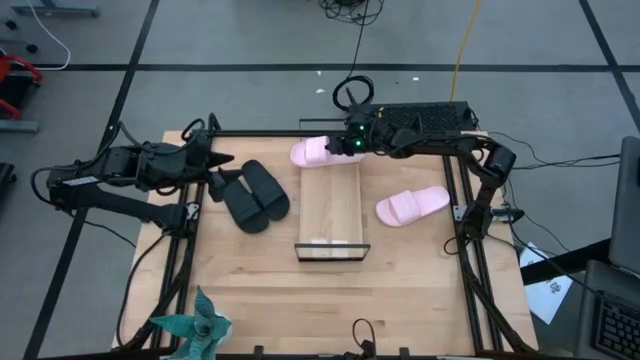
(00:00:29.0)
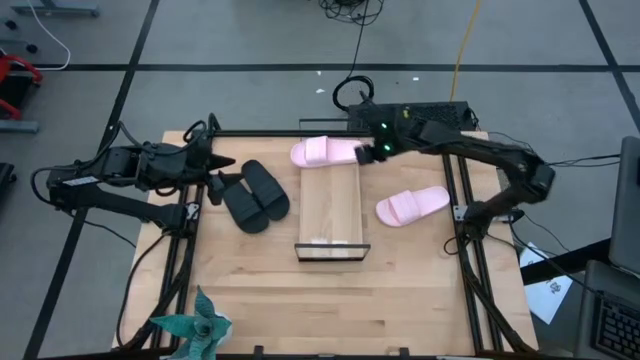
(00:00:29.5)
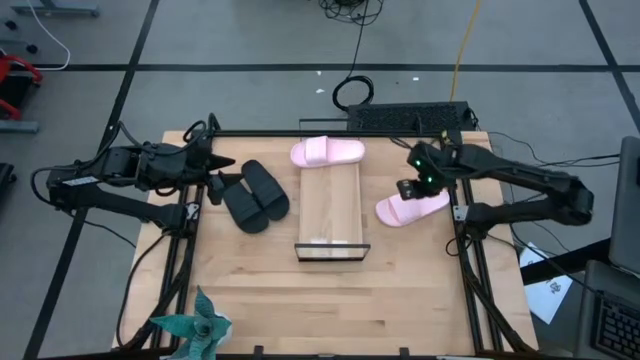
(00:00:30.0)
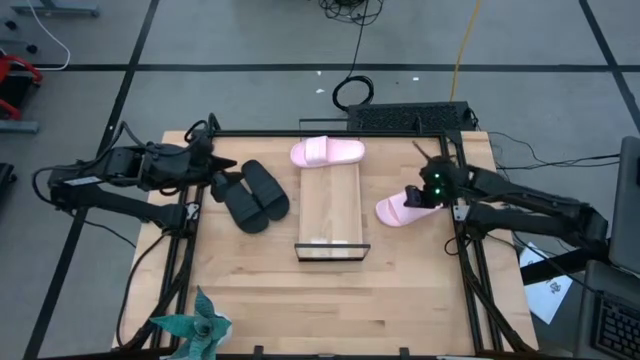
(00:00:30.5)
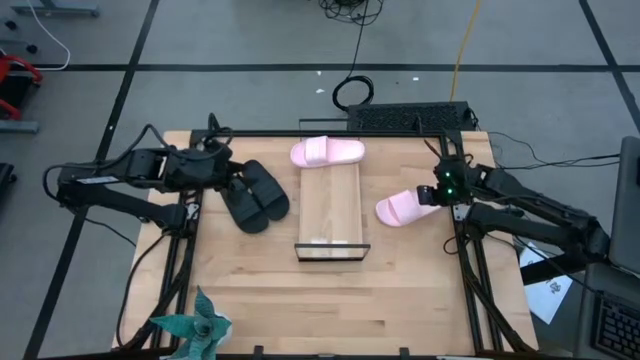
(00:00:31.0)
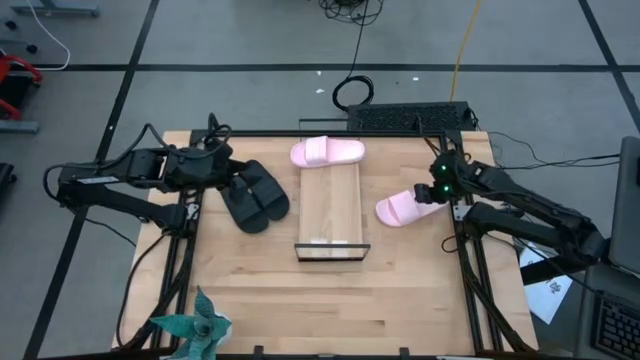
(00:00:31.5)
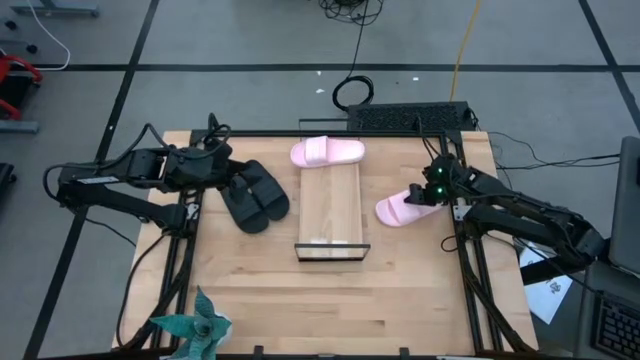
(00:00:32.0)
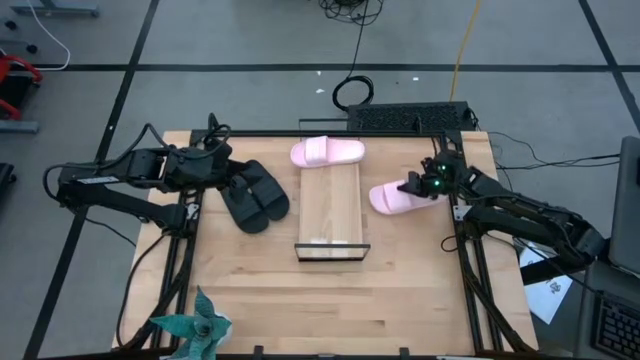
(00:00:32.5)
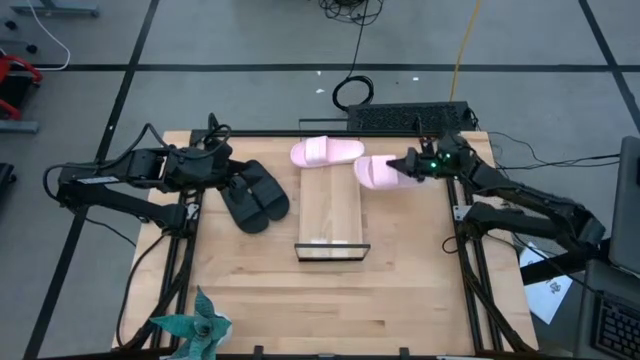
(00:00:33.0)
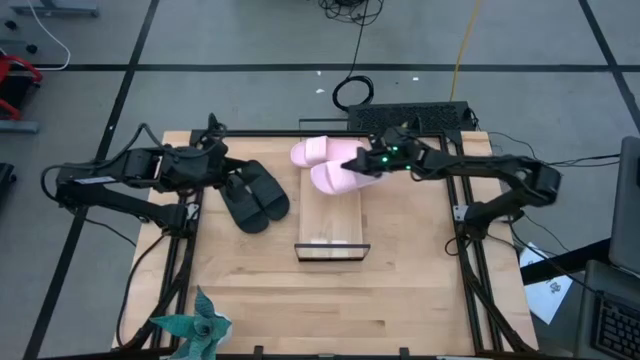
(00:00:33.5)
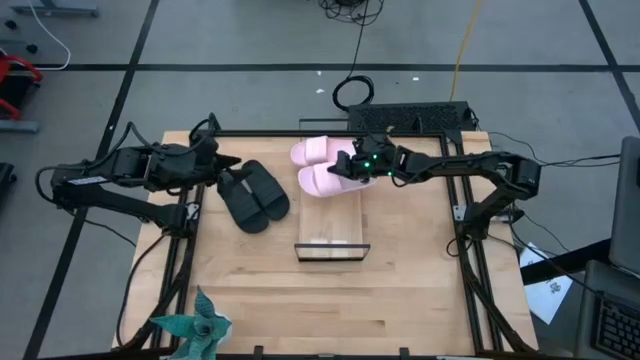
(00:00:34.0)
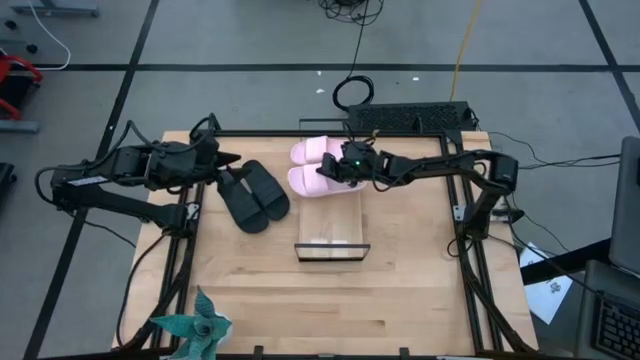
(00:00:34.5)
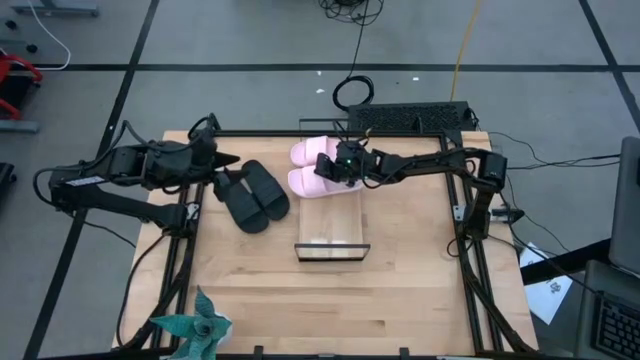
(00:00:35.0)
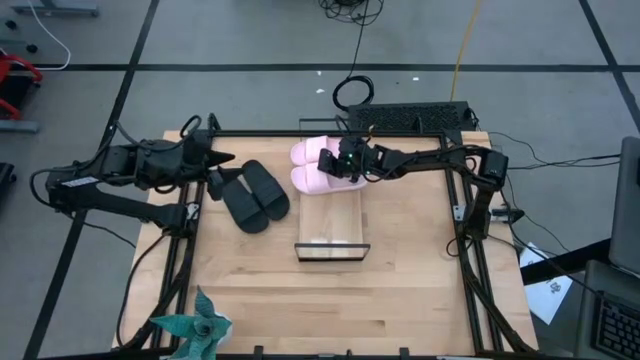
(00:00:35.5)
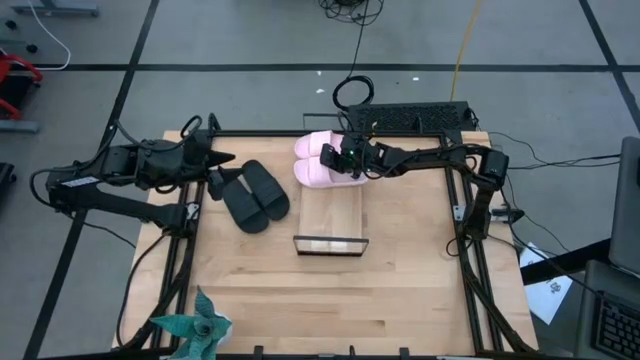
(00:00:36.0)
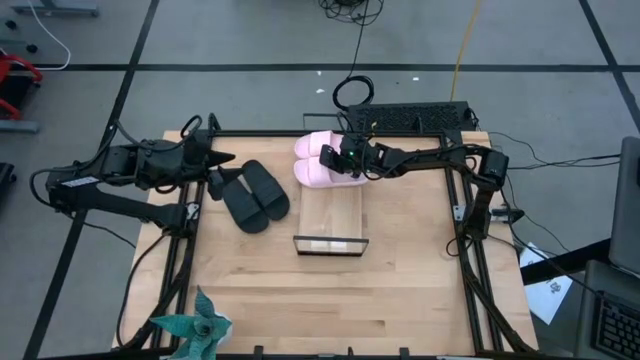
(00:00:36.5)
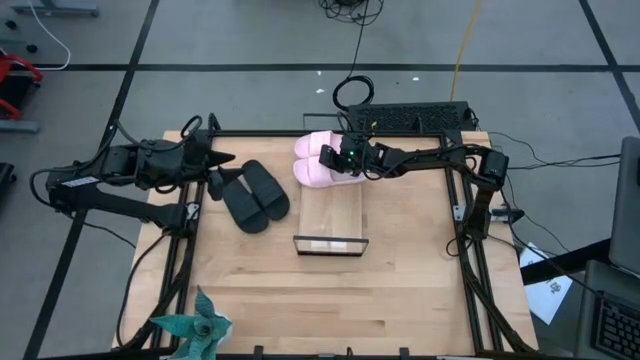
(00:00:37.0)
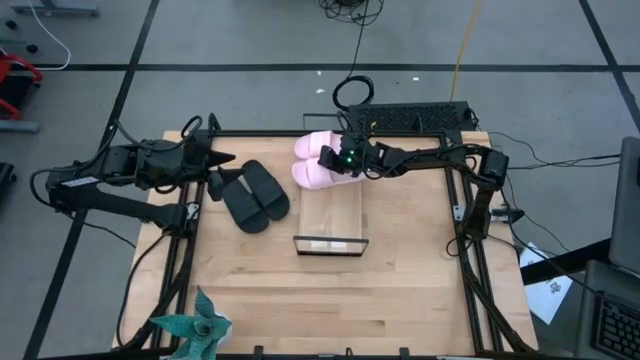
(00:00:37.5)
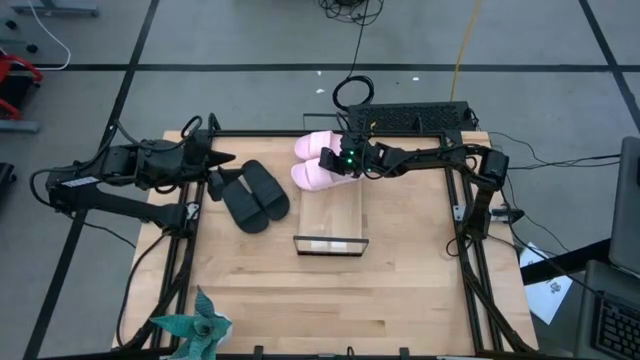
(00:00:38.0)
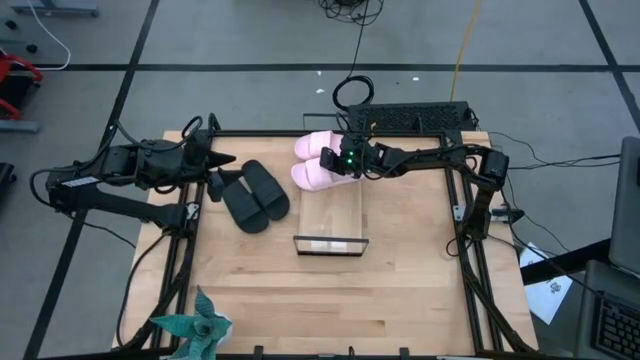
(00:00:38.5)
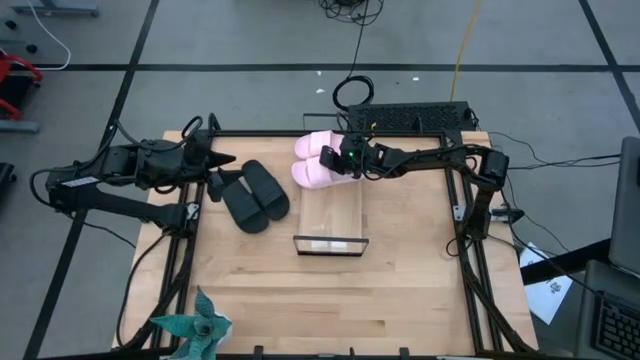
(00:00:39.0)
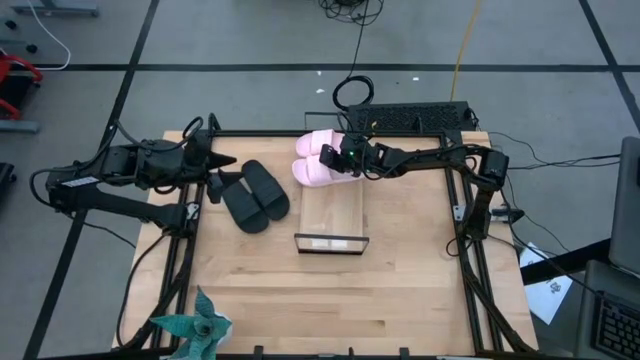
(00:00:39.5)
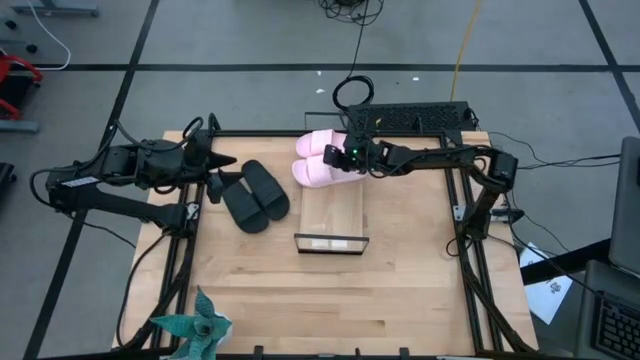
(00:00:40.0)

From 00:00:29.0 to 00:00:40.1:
Task: Pick and place slides into the shelf
Put the pink slide on the shelf
